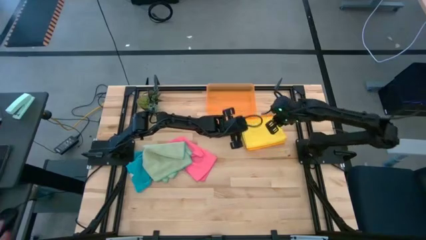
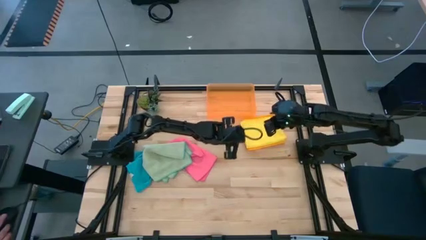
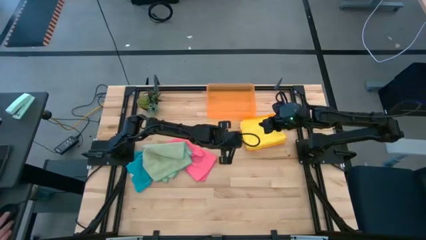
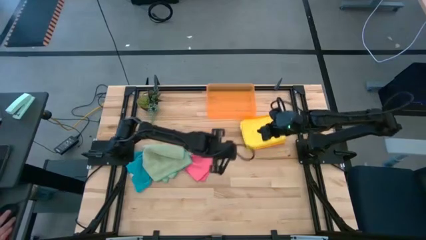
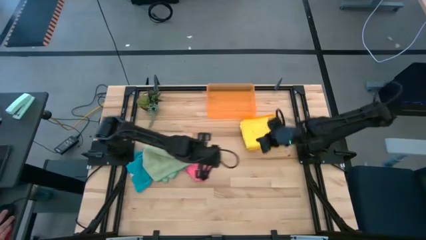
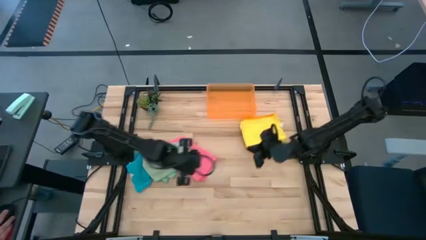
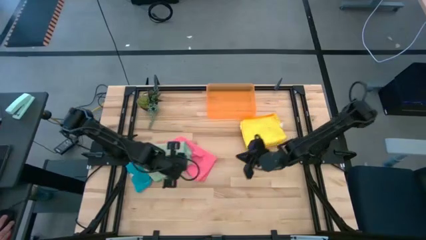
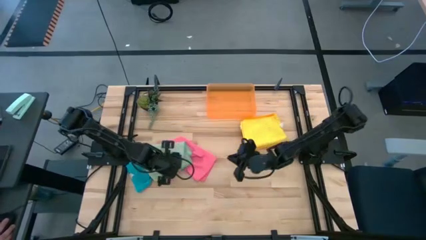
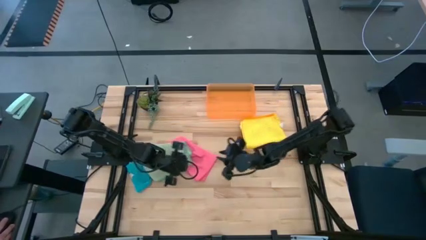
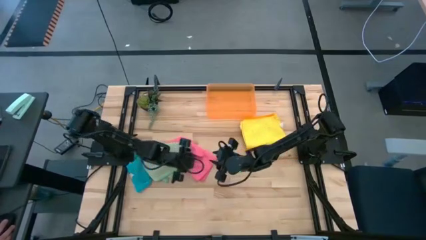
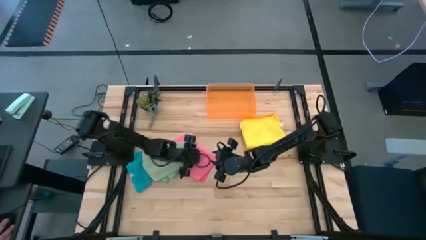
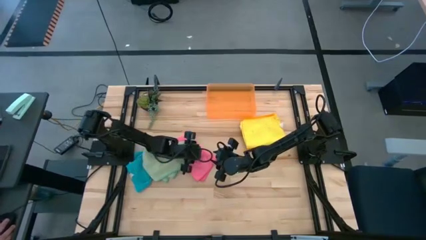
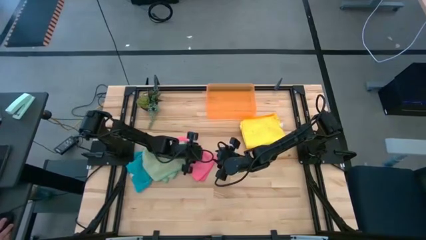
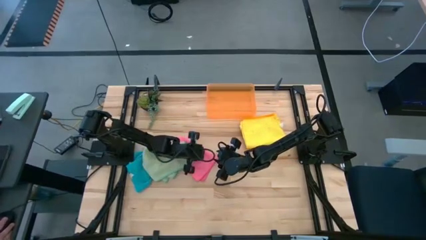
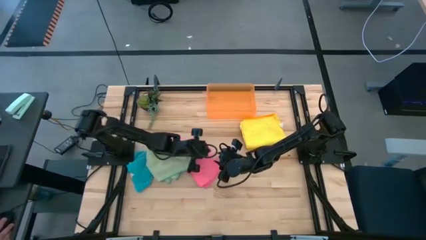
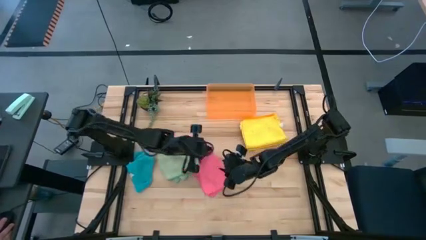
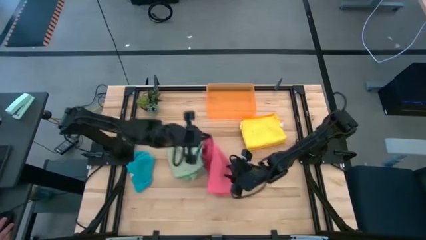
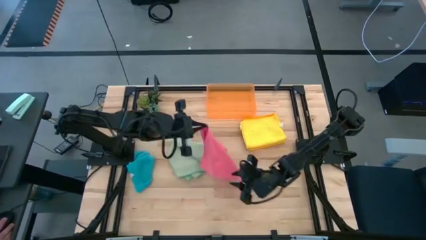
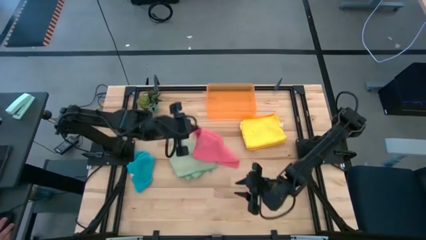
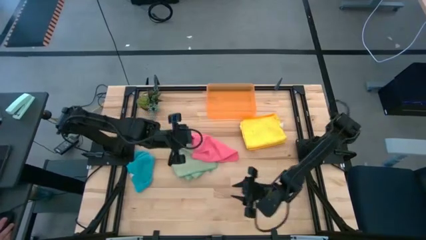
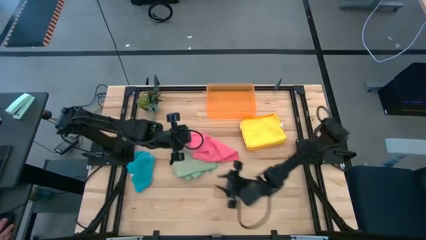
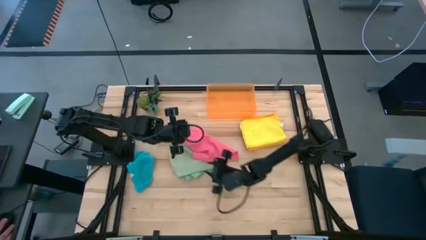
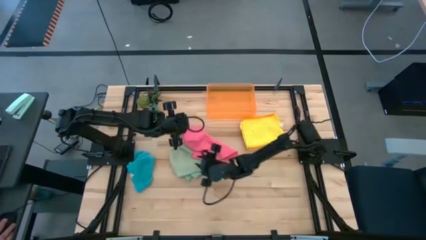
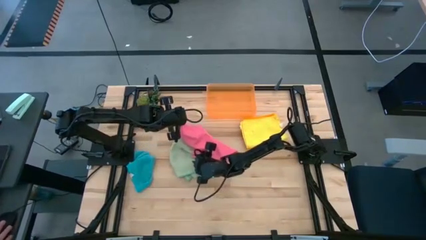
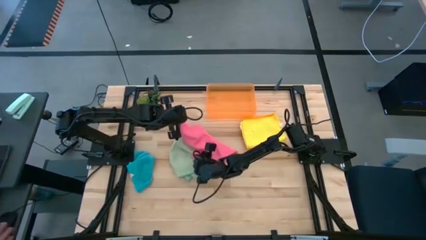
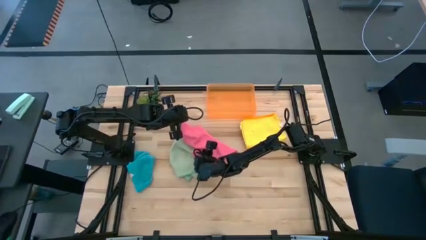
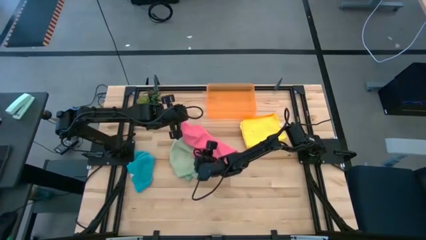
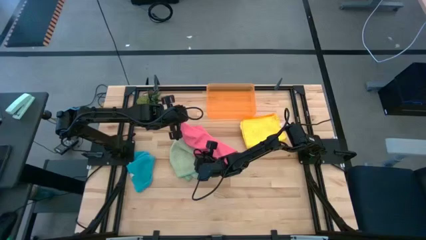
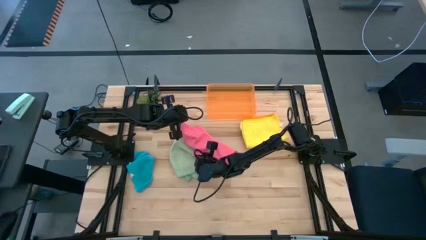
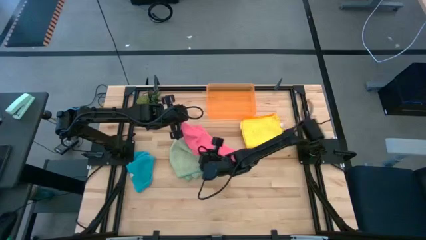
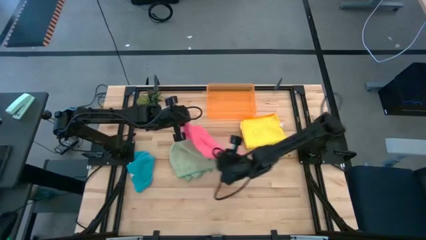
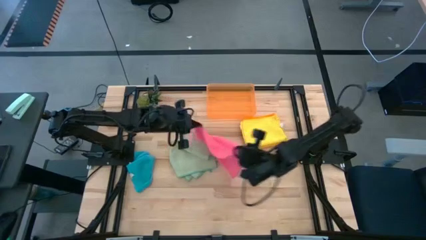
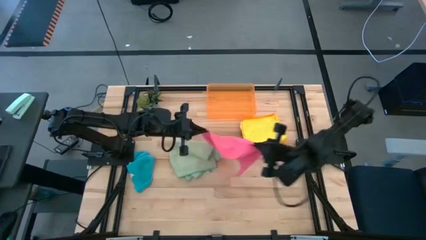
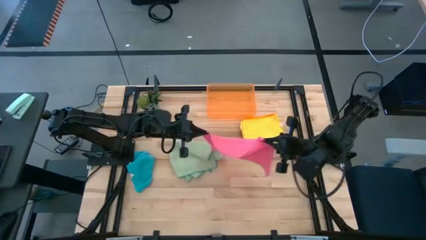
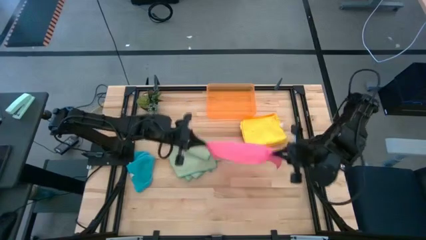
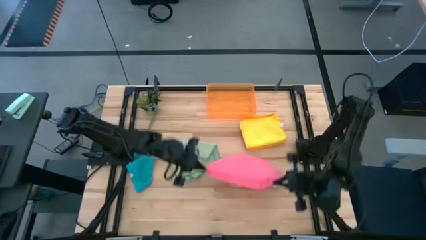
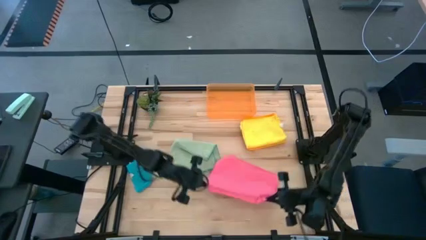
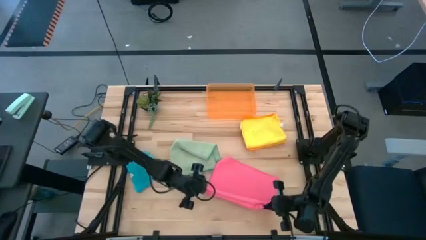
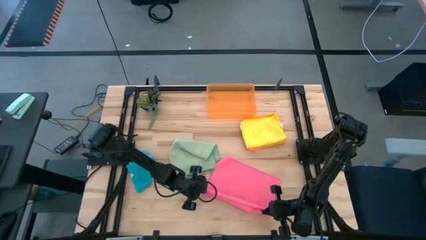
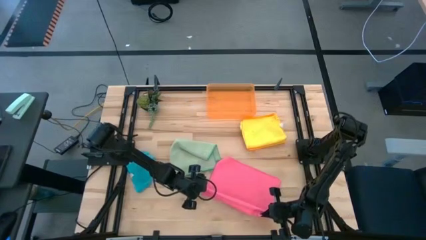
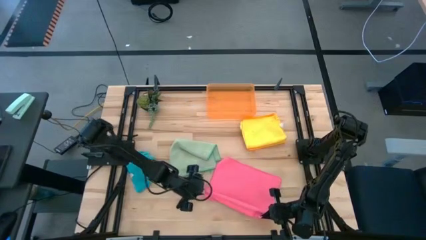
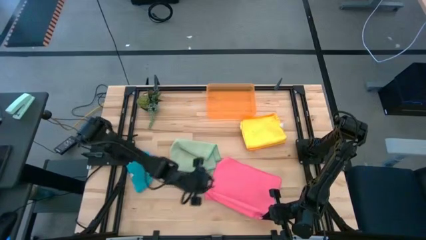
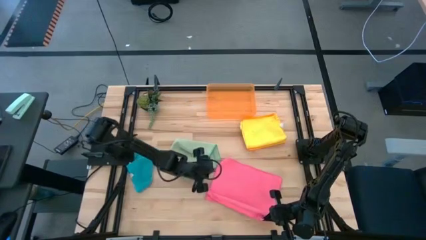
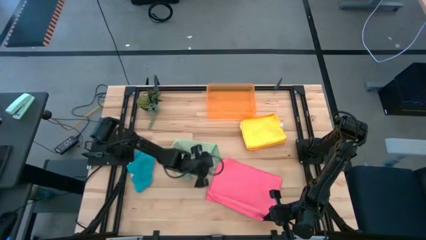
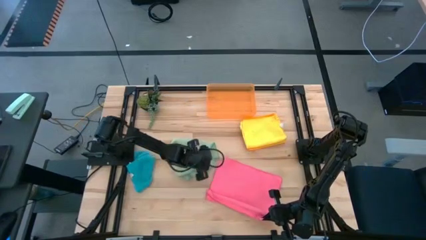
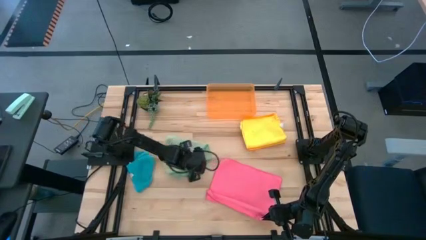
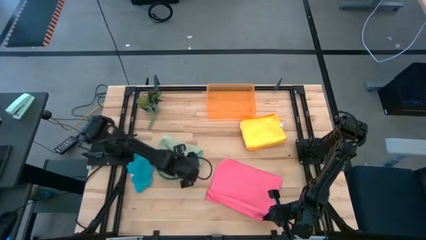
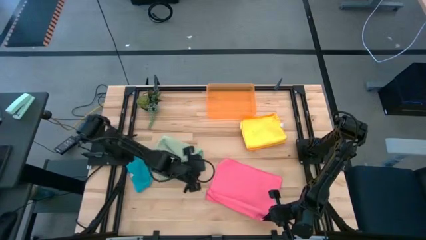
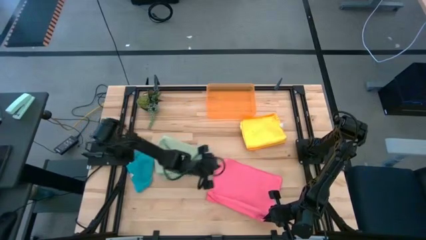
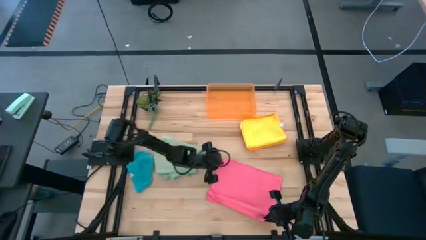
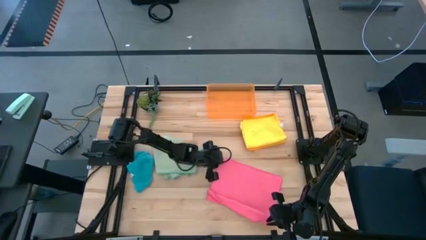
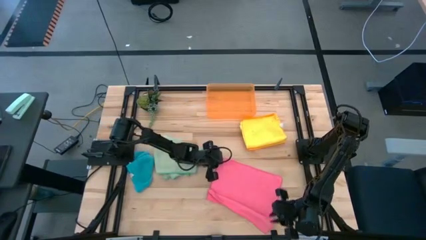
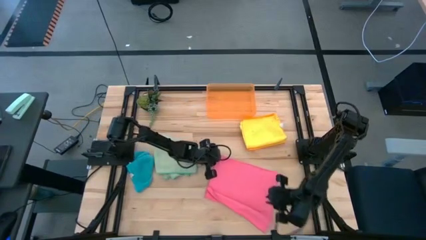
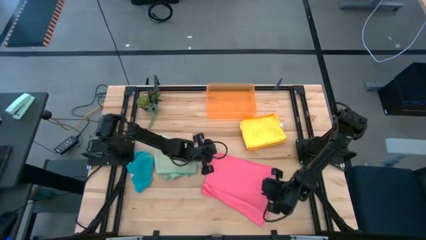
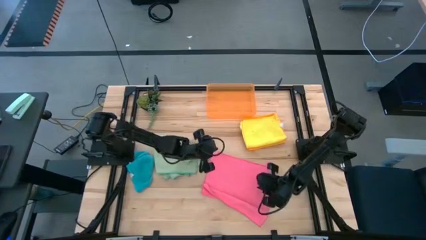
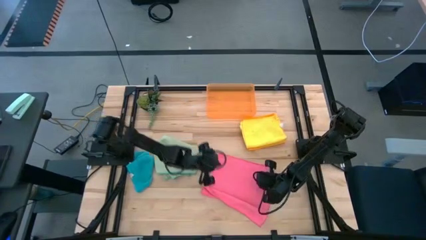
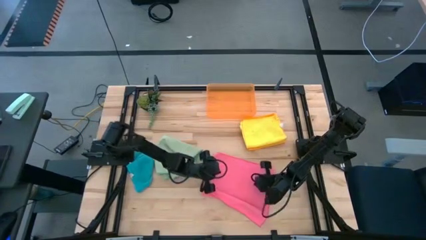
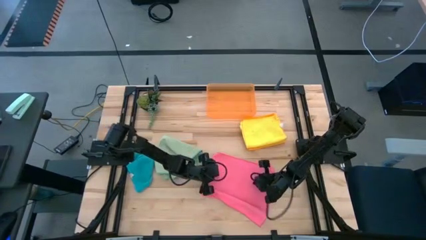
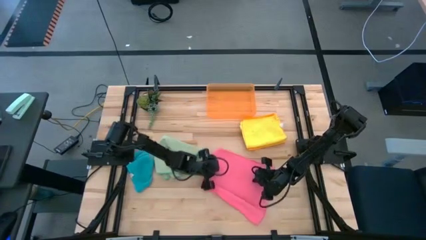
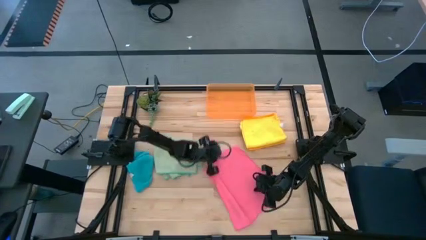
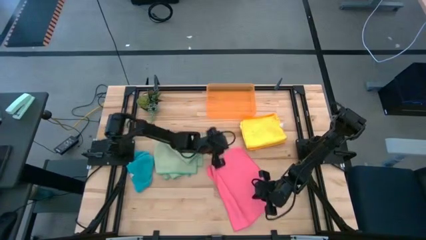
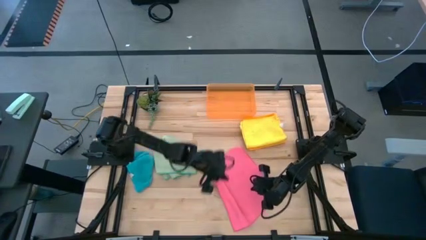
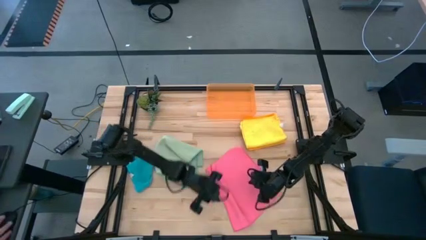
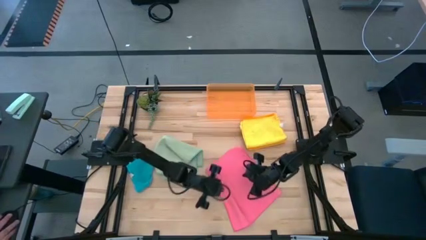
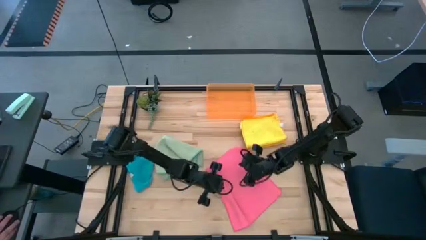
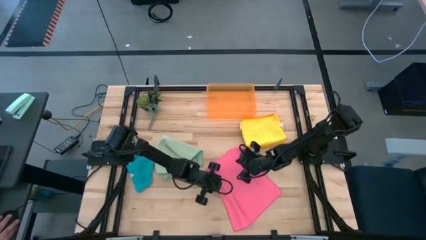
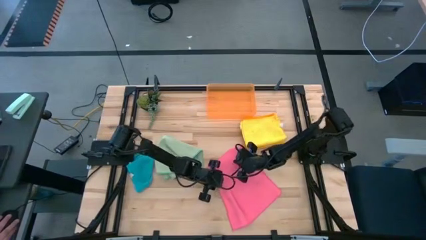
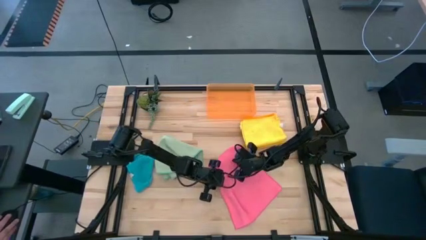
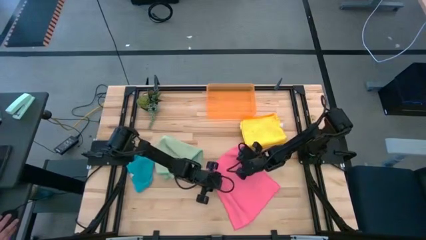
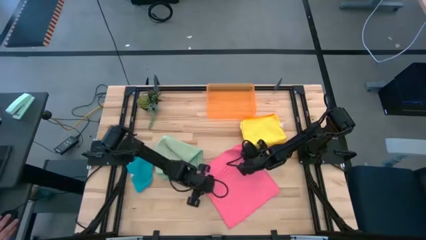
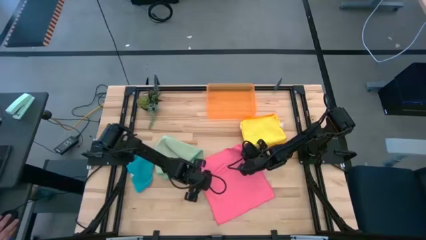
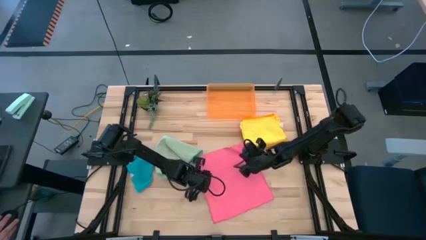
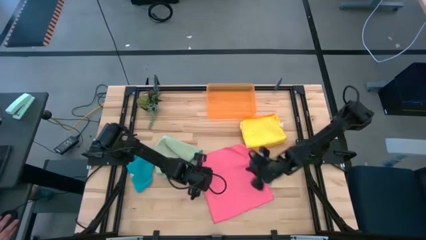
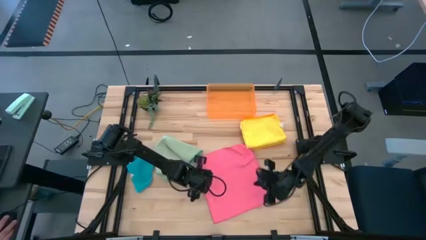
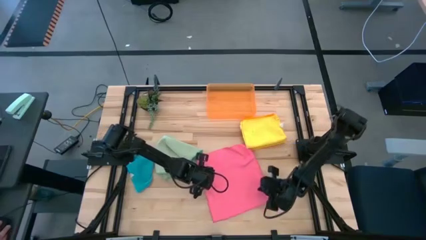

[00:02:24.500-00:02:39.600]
Task: Fold microfiber towels
Fold the pink microfiber cloth

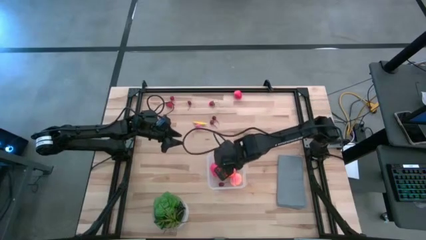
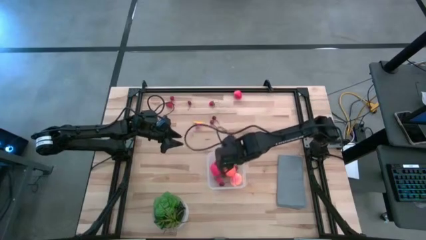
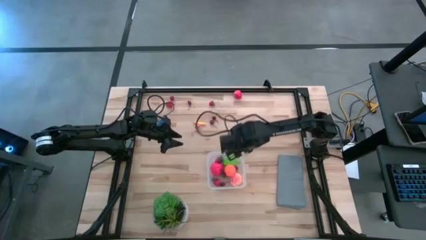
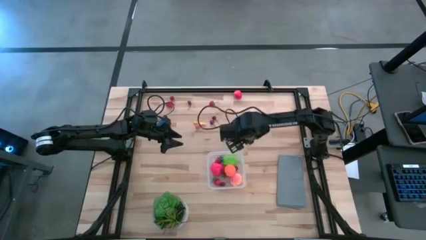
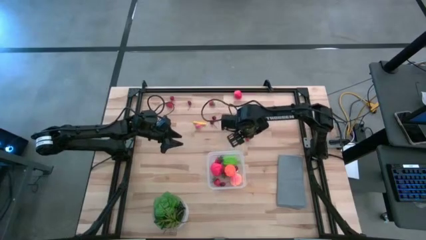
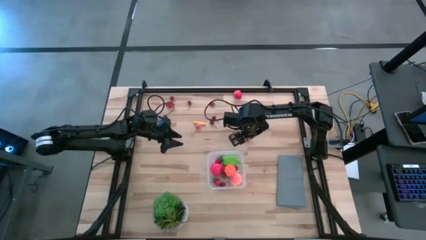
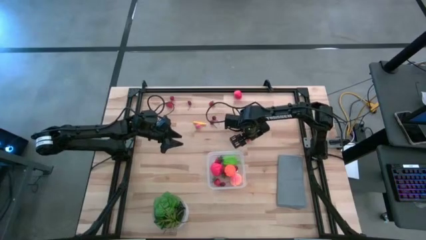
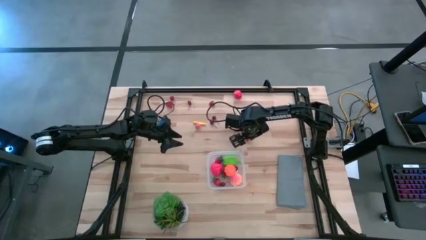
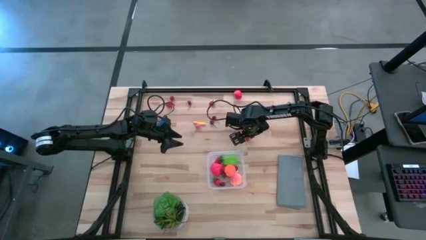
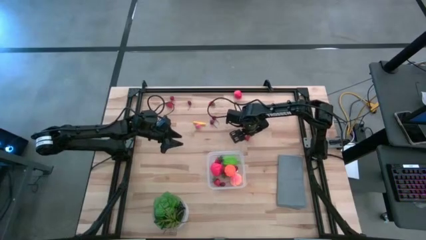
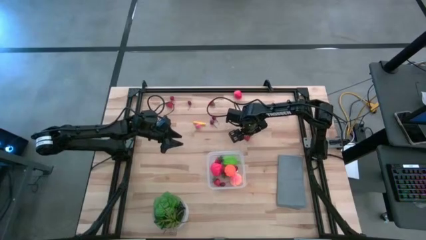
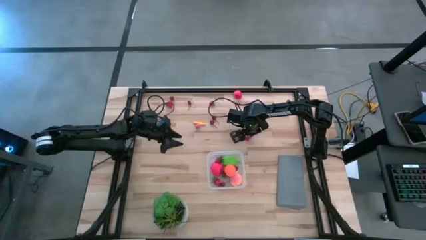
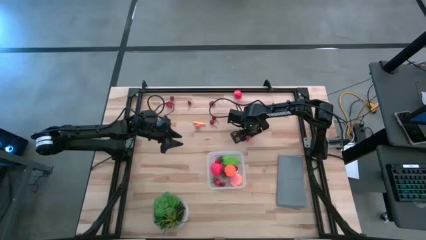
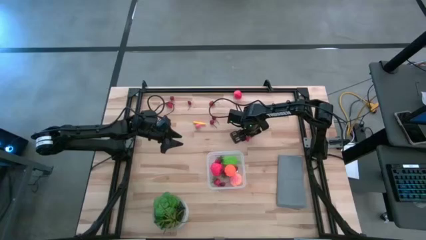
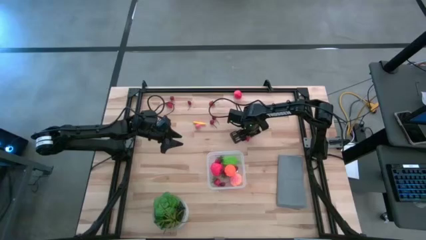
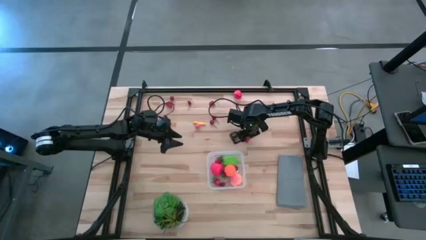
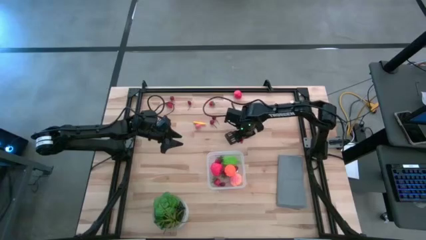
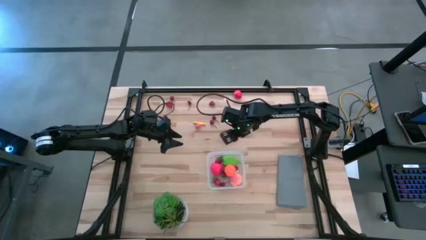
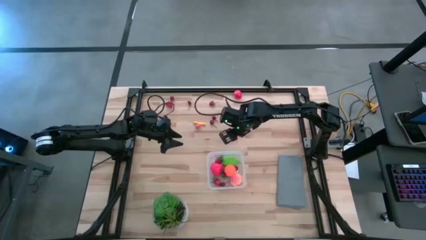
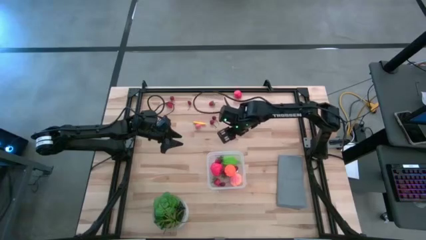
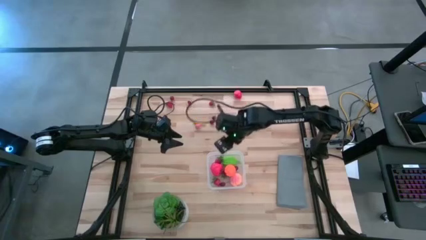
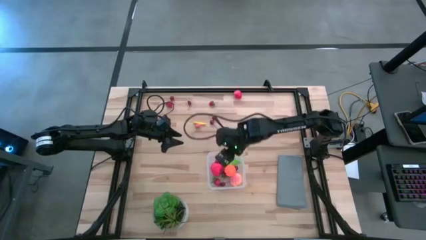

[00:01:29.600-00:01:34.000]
Task: Pick and placing Produce into tupperware
Put the strawberry into the transparent bin
